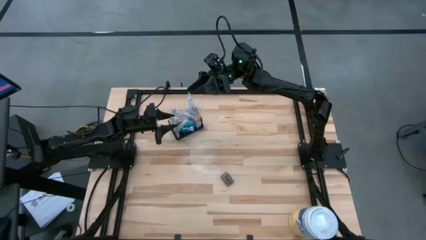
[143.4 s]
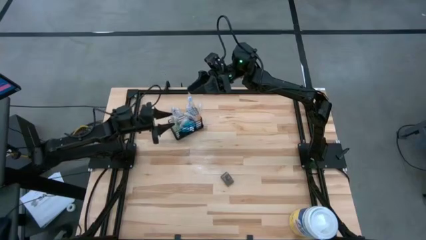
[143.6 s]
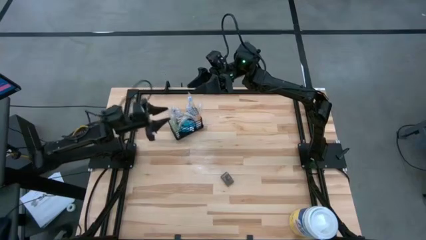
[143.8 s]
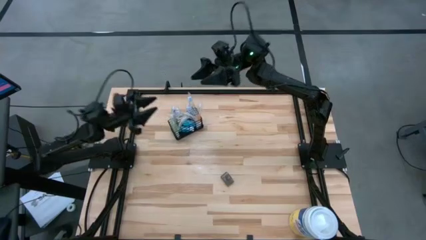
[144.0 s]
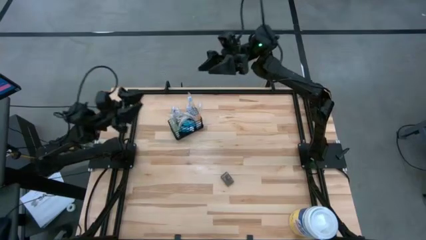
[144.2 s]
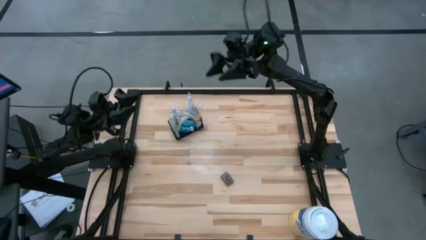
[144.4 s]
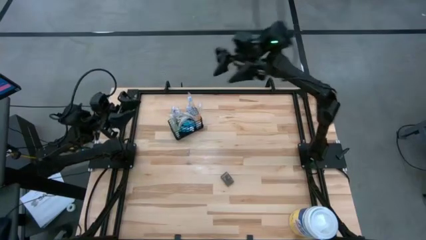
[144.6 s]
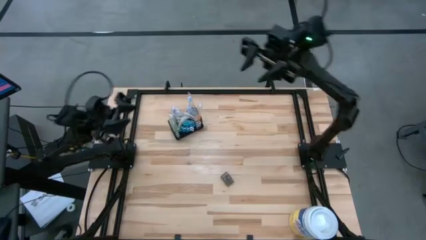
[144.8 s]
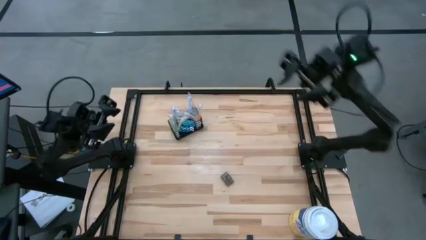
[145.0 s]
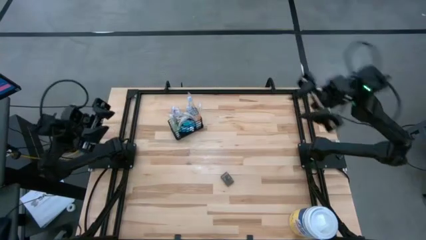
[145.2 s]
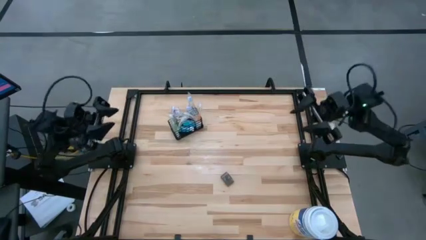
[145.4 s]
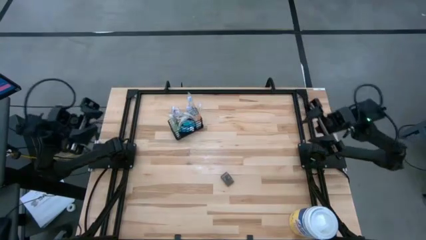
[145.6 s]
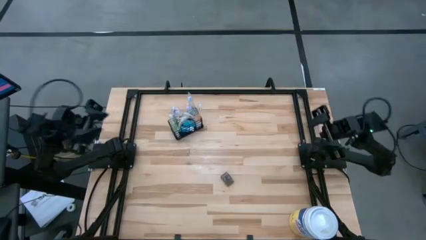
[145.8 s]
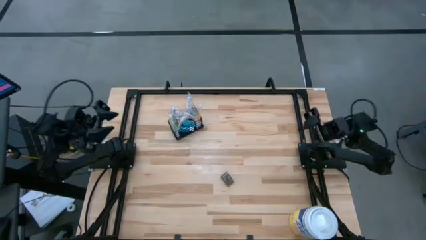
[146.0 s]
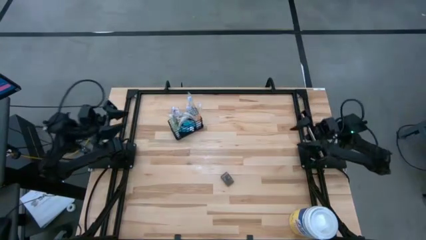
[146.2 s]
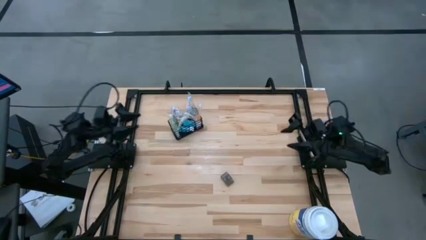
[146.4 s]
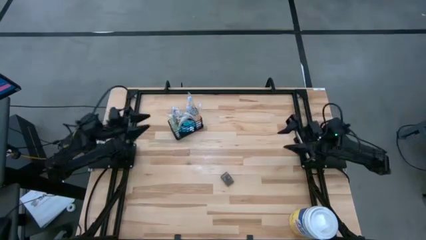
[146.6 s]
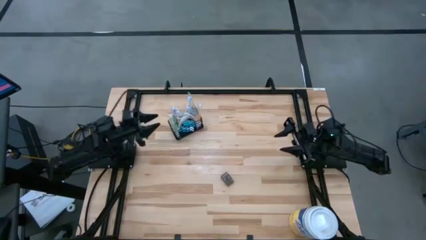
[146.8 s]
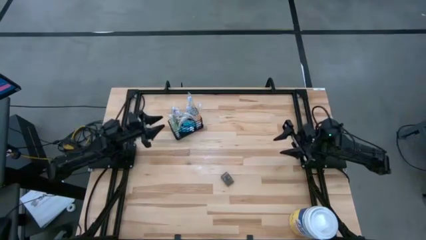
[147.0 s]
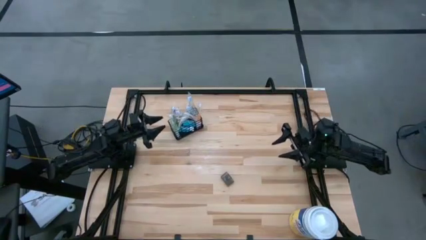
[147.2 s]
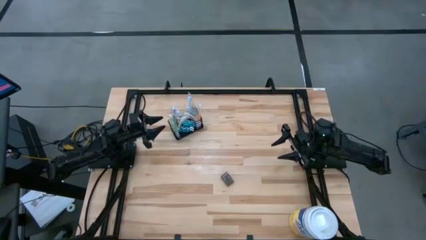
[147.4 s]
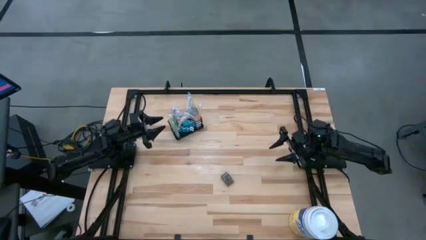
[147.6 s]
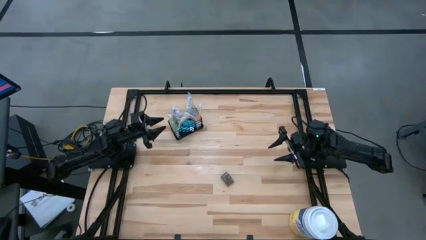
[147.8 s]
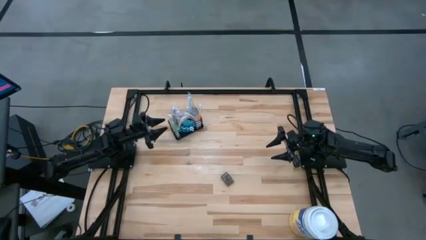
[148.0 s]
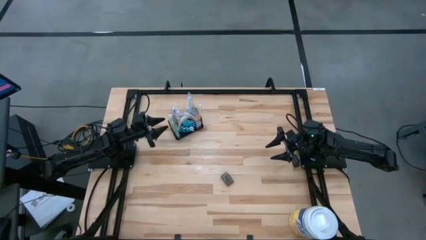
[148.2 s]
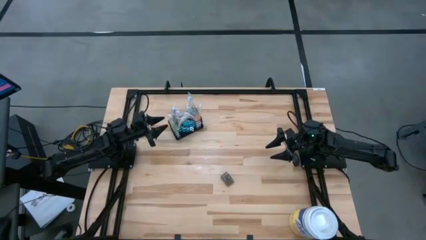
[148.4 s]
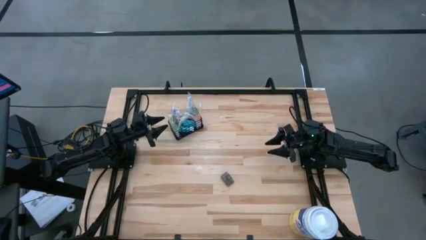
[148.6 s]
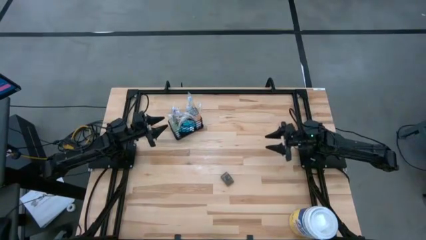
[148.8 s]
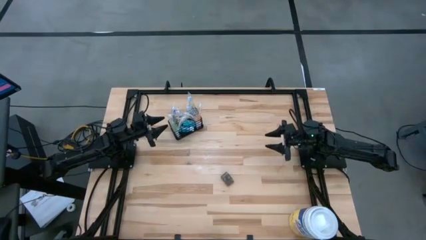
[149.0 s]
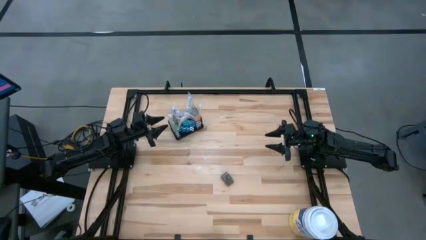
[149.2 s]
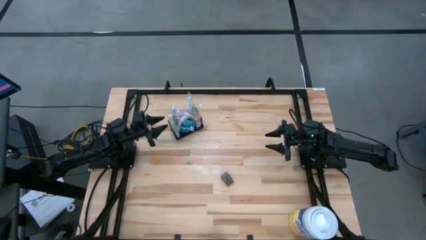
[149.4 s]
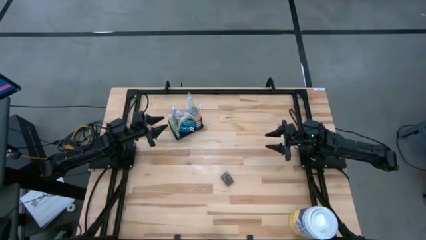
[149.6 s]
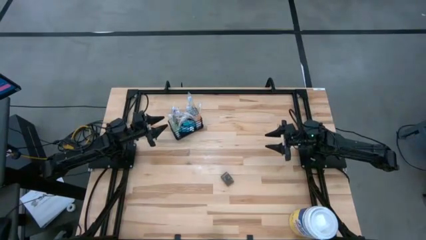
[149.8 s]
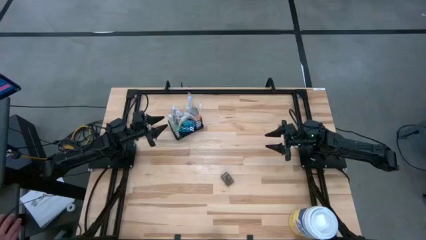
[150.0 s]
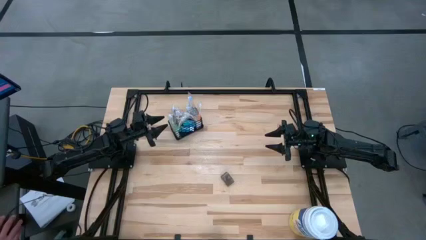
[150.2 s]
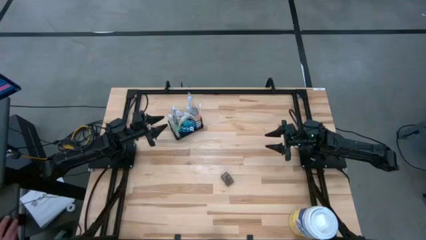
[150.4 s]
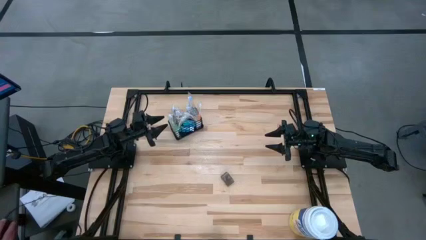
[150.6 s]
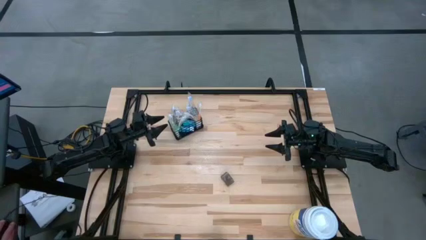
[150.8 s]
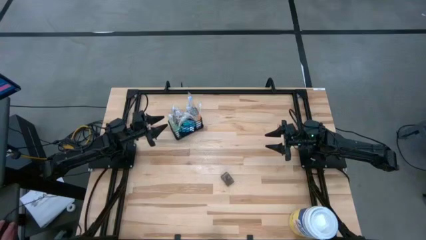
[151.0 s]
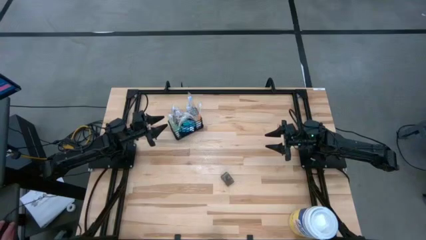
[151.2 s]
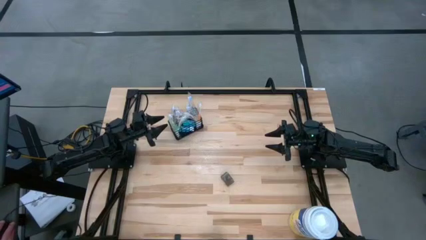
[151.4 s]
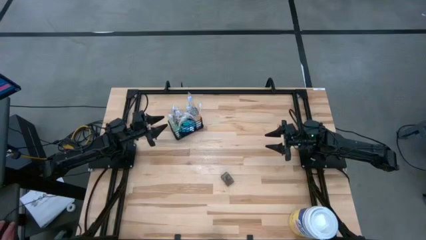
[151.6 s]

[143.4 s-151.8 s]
Task: Pick & Place toothbrushing station
Return to Home Position

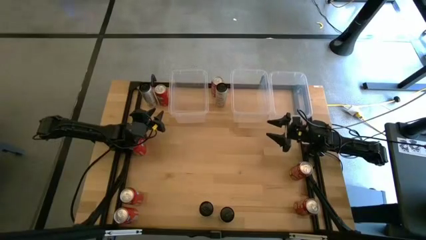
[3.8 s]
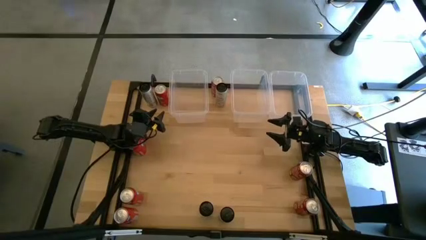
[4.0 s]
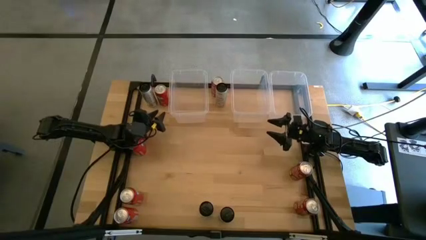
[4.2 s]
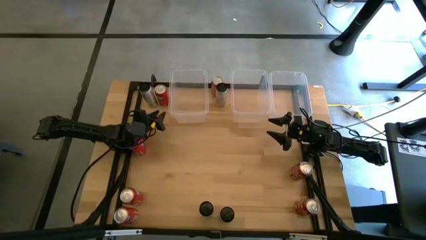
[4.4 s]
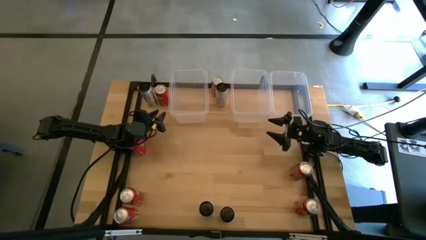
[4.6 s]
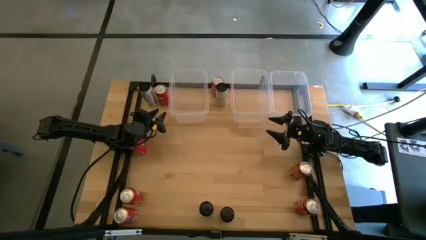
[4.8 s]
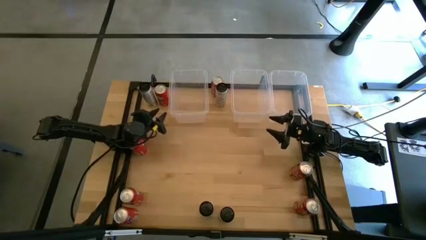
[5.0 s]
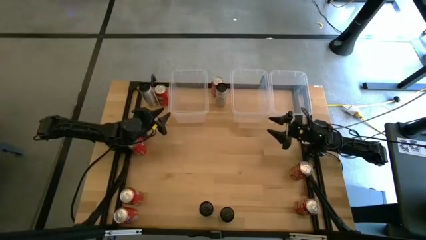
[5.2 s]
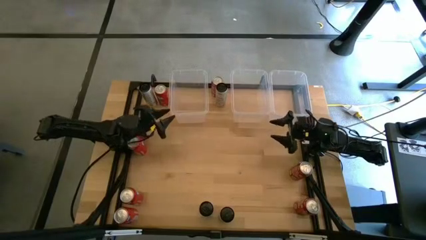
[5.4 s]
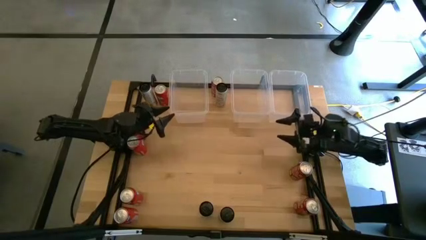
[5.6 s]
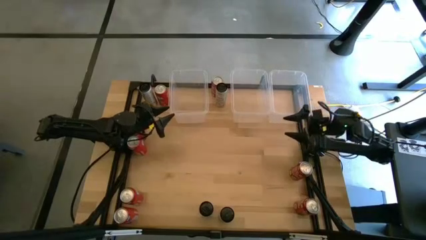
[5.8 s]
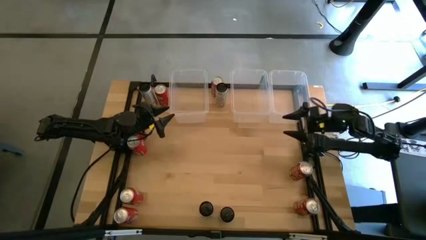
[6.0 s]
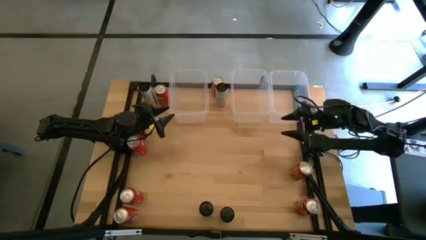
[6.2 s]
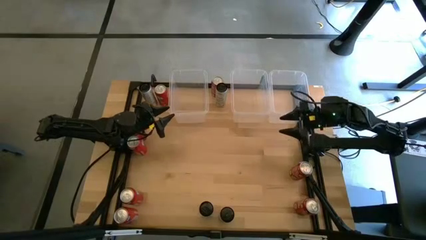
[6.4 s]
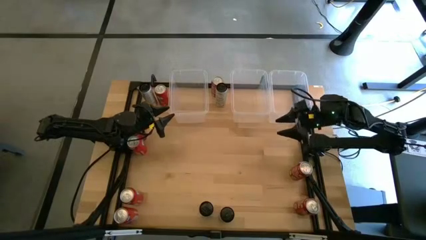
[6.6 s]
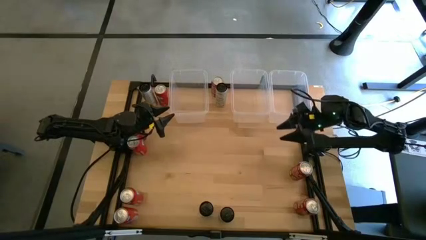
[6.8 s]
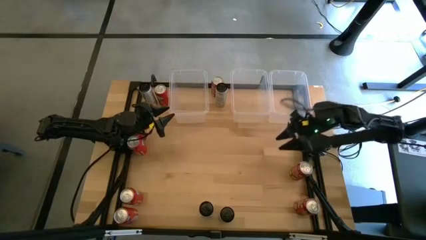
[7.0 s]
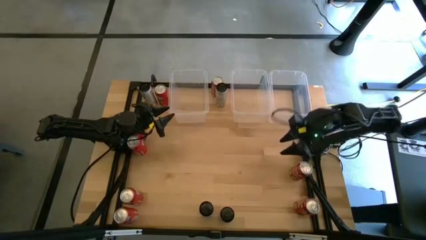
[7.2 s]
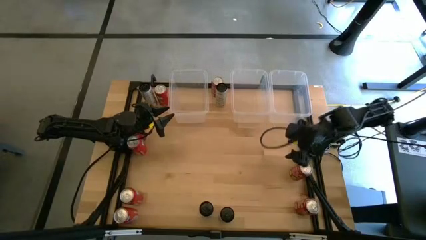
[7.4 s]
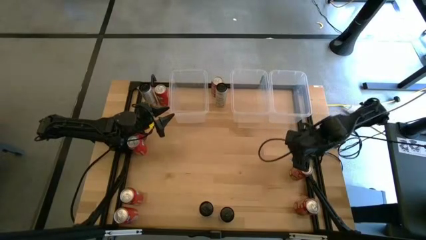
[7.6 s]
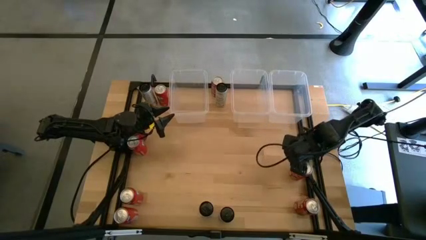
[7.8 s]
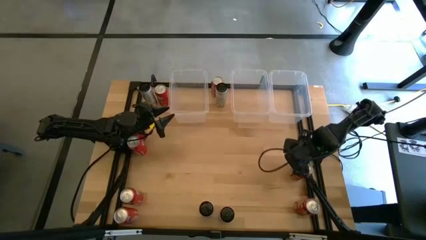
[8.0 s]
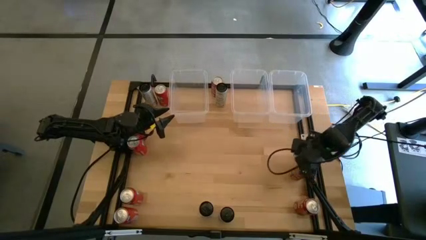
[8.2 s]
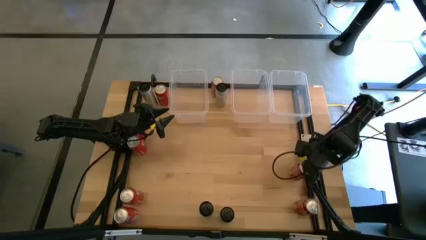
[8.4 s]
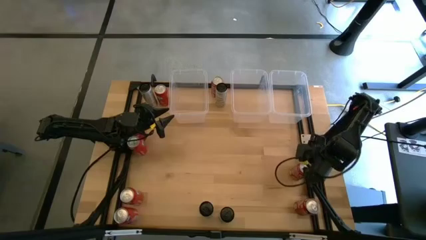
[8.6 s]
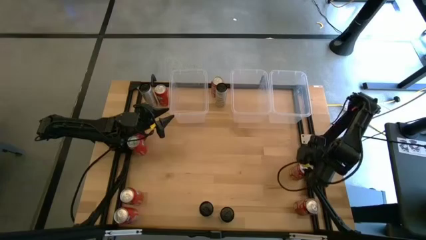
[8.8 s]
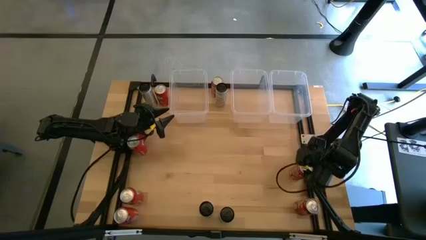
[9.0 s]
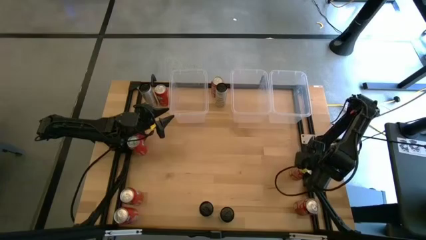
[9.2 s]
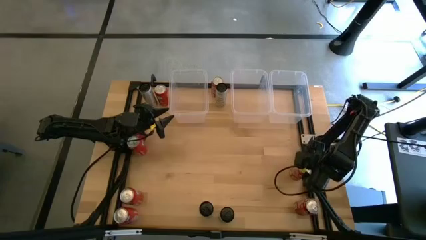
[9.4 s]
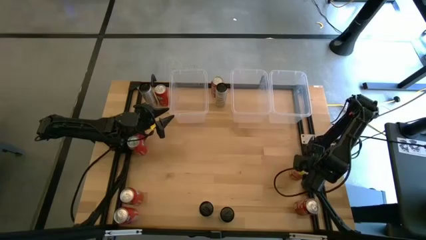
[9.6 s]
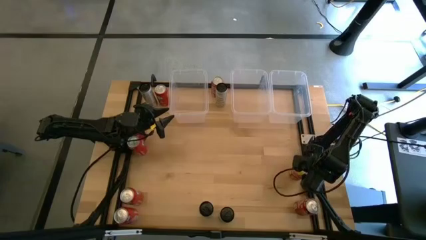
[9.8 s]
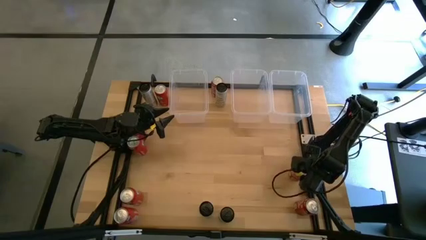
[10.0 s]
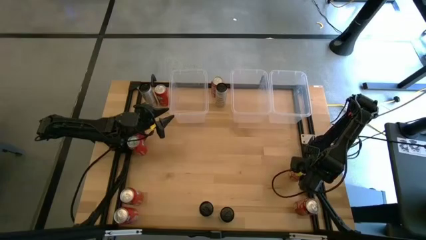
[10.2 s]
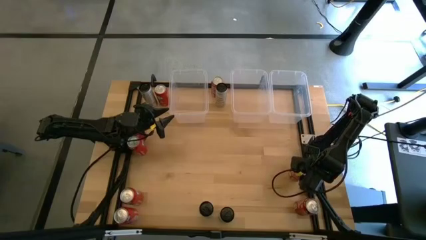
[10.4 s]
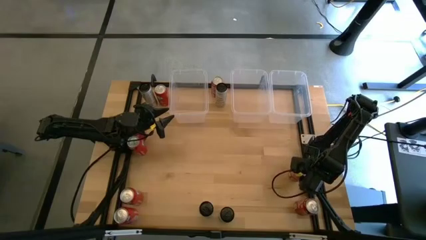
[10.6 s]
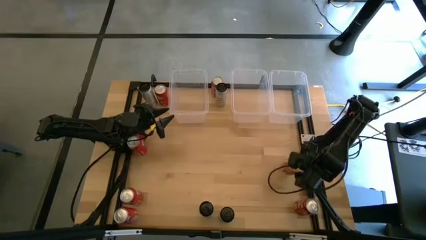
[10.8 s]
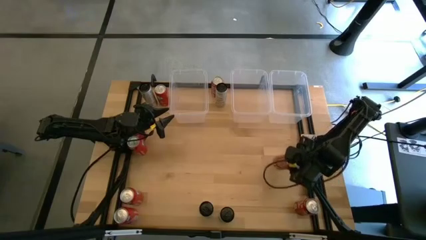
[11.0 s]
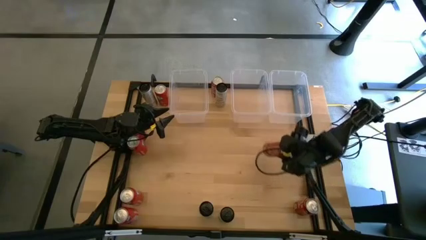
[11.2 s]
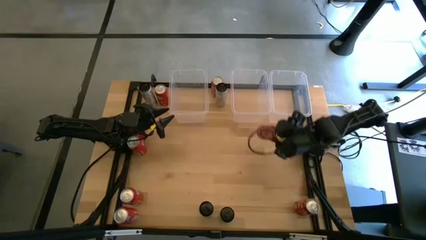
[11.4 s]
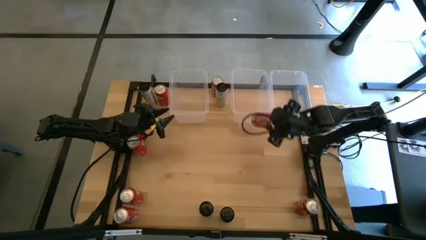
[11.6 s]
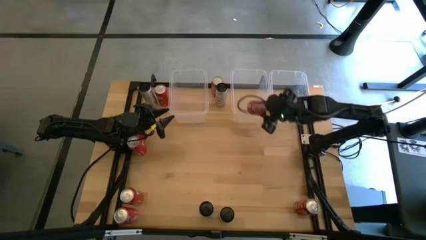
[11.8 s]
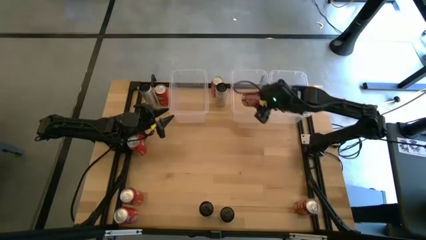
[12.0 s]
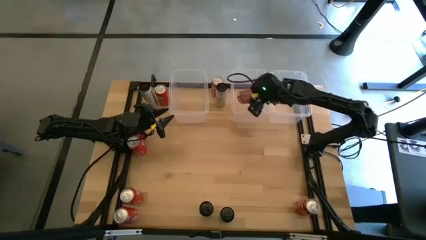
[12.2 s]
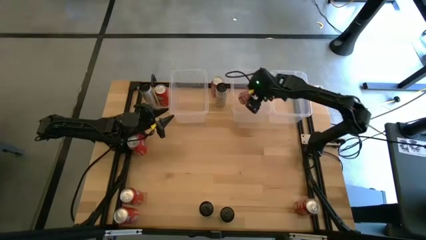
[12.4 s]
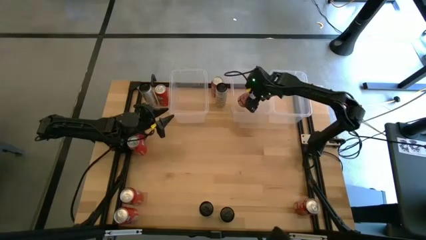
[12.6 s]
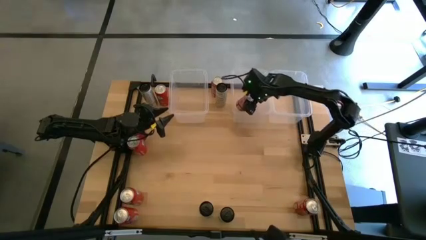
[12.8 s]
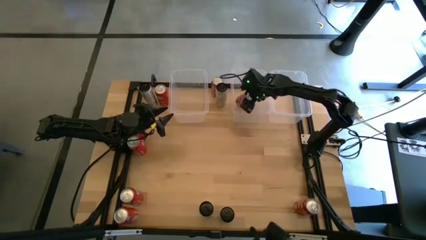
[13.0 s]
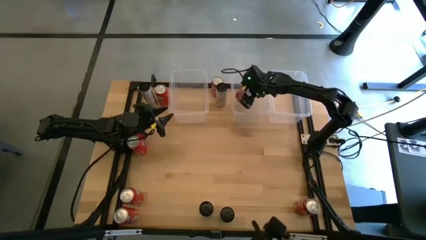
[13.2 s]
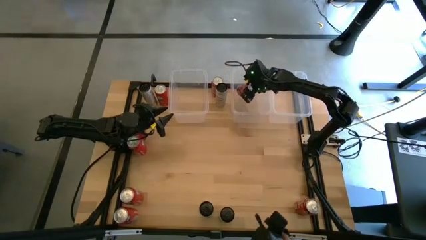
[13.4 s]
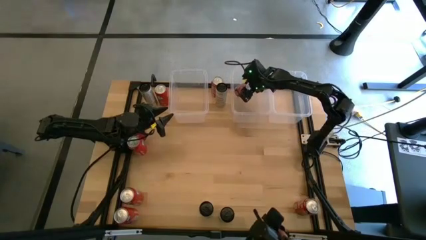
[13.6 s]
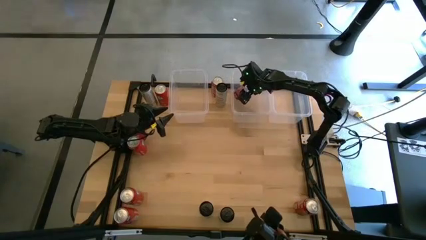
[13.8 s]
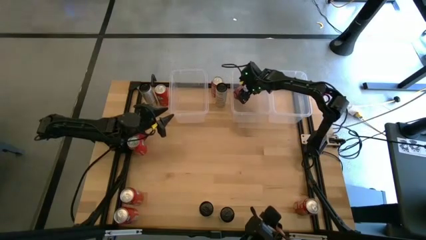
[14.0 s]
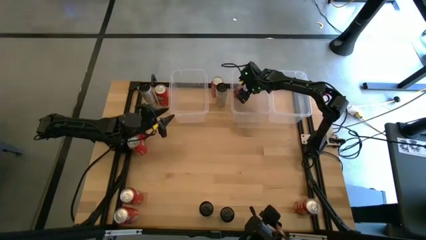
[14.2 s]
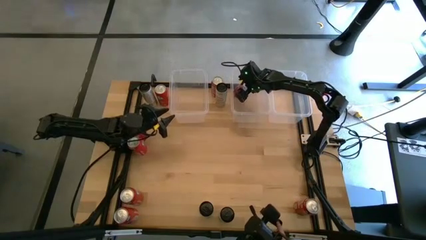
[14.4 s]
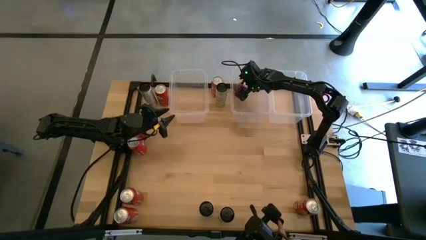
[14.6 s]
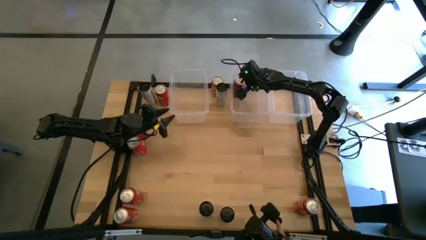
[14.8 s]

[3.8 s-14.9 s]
Task: Sort soda cans
Put the middle right red soda can into the center transparent bin
